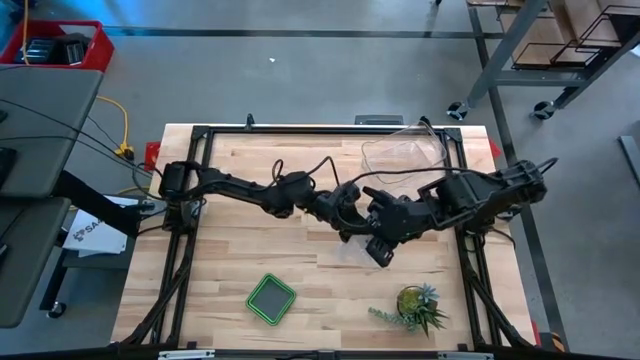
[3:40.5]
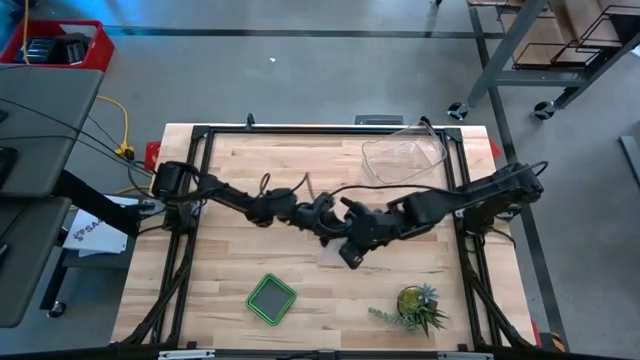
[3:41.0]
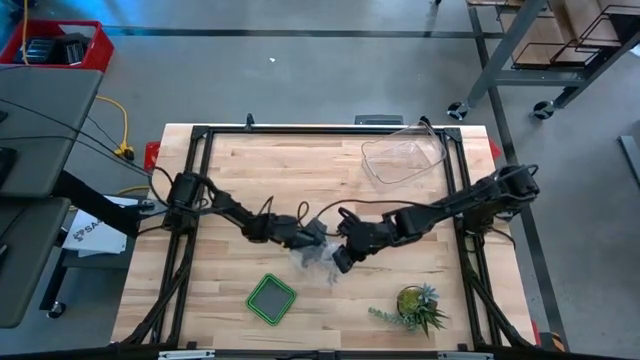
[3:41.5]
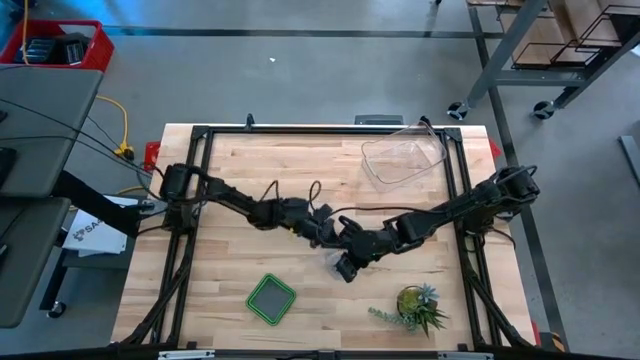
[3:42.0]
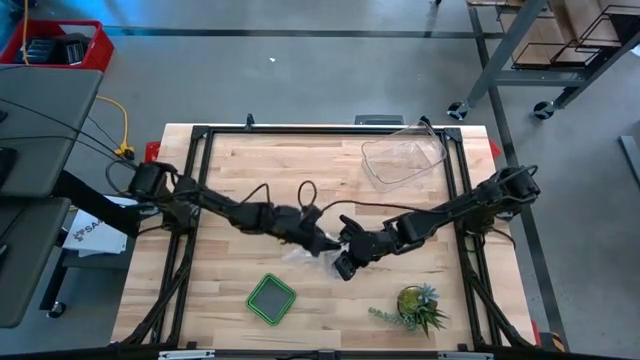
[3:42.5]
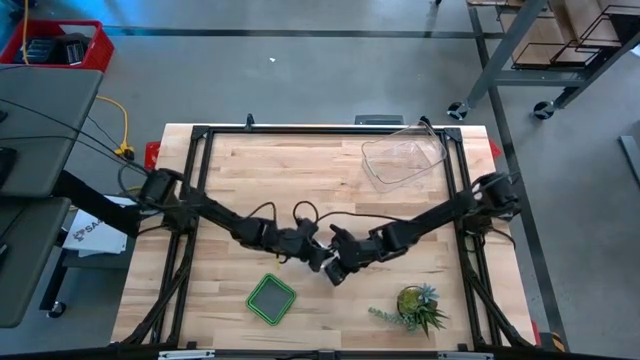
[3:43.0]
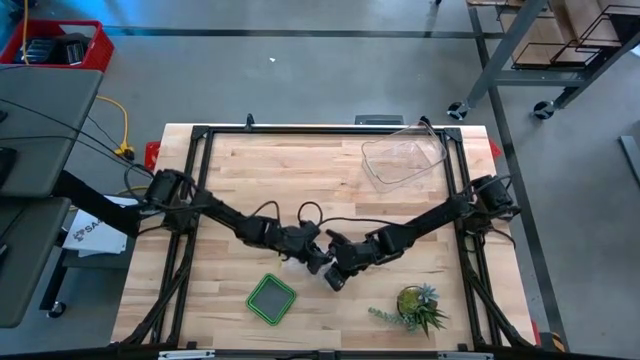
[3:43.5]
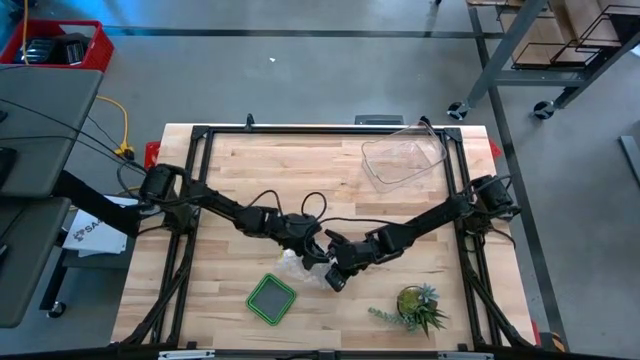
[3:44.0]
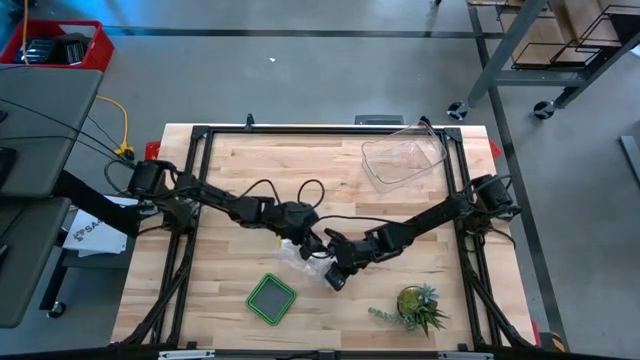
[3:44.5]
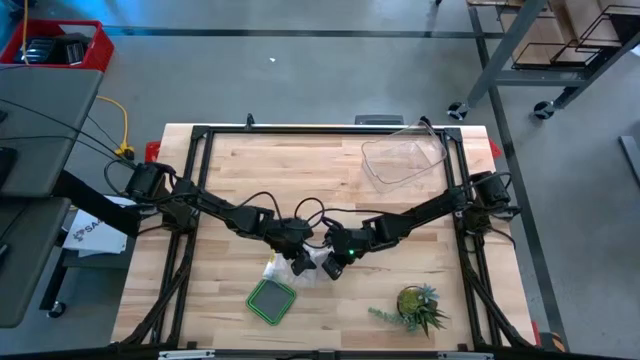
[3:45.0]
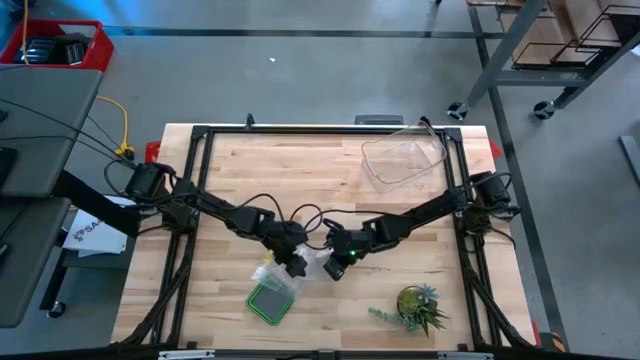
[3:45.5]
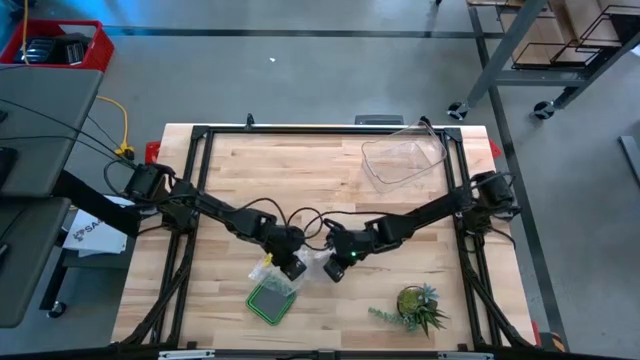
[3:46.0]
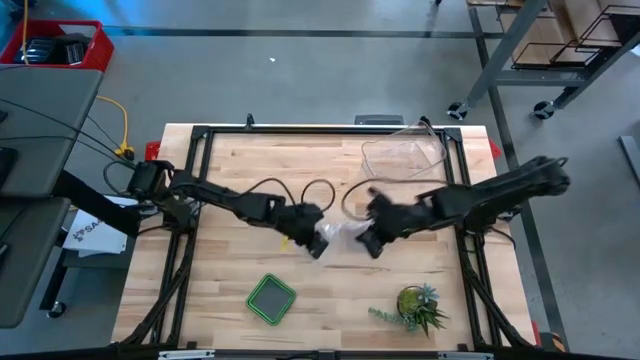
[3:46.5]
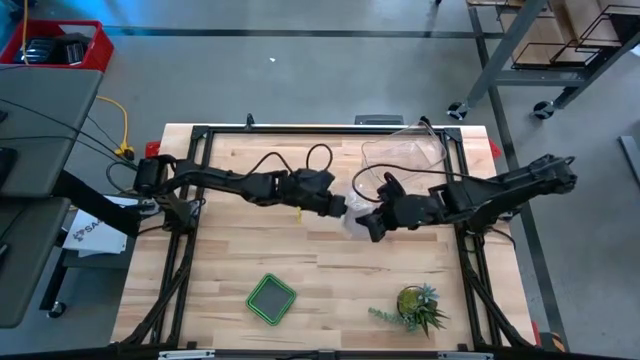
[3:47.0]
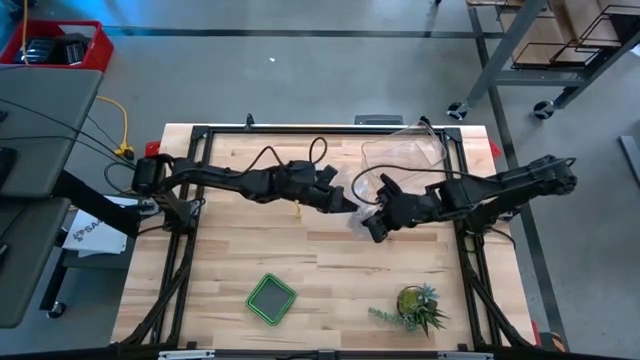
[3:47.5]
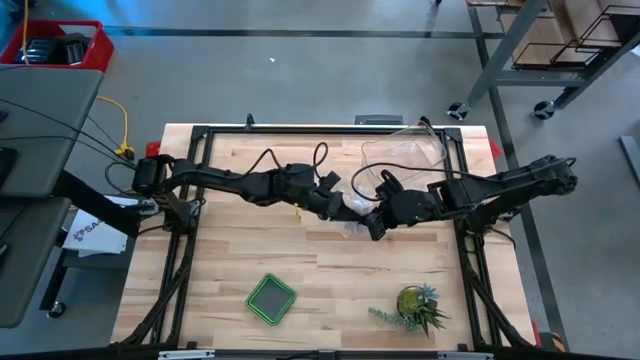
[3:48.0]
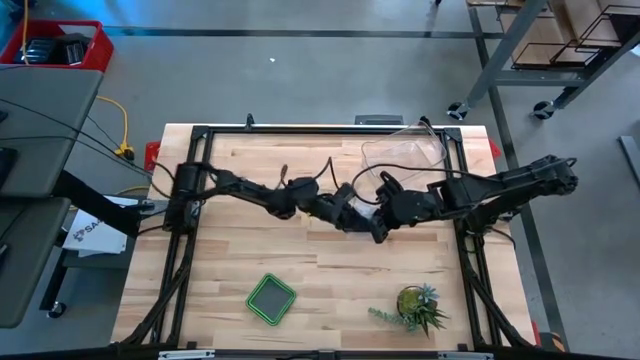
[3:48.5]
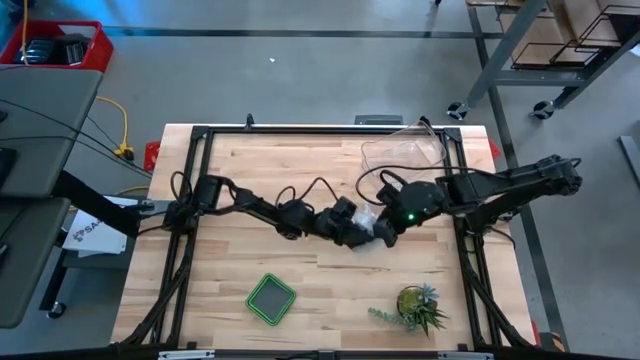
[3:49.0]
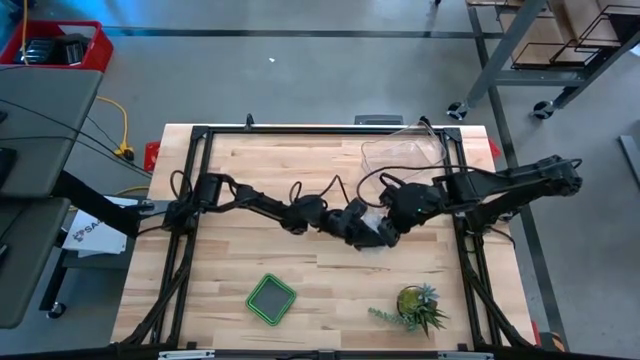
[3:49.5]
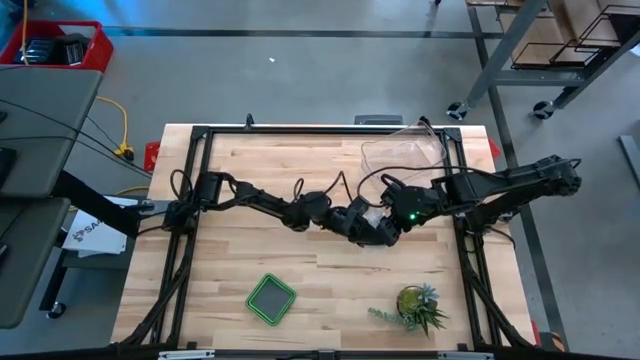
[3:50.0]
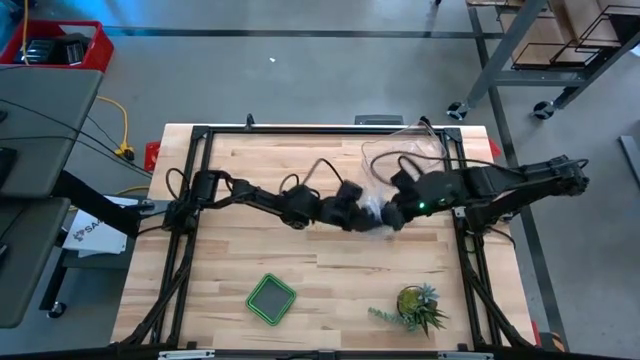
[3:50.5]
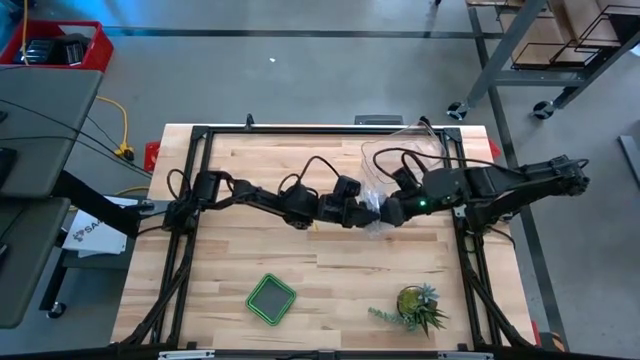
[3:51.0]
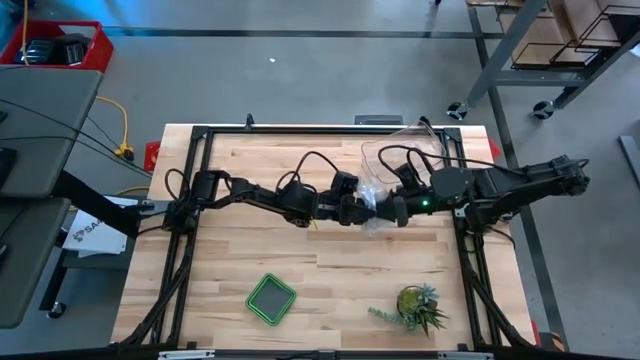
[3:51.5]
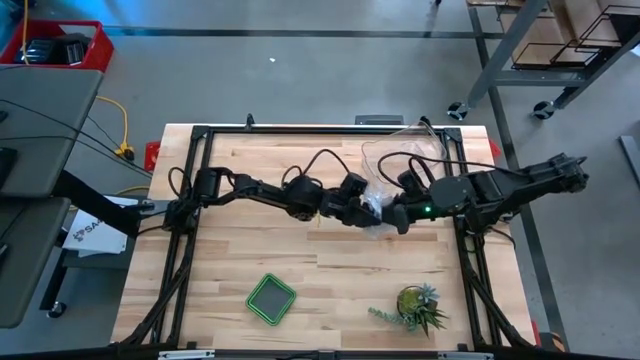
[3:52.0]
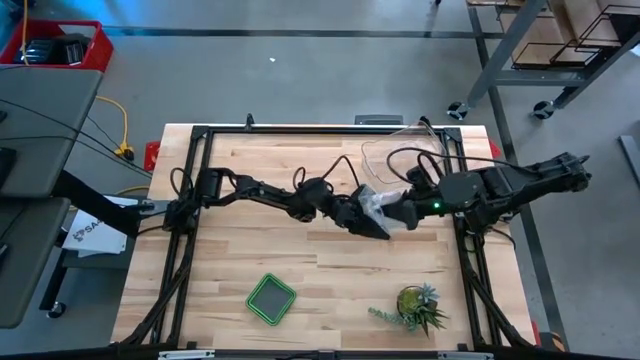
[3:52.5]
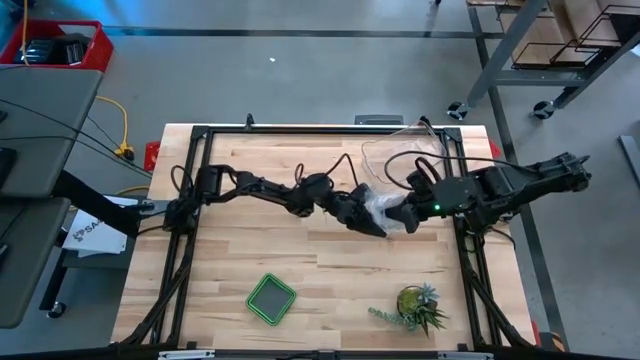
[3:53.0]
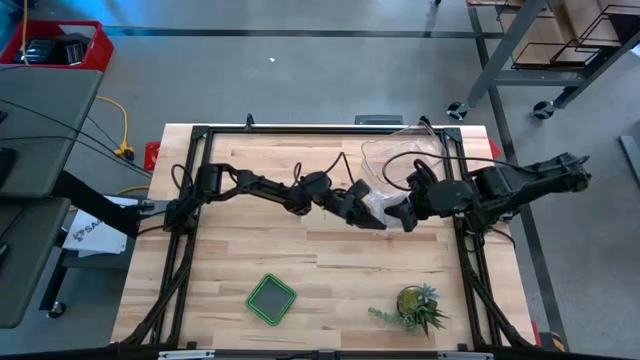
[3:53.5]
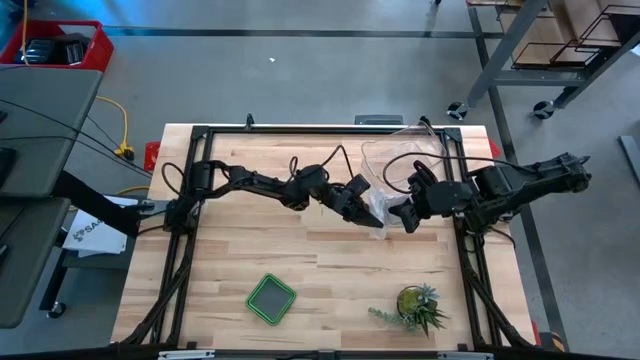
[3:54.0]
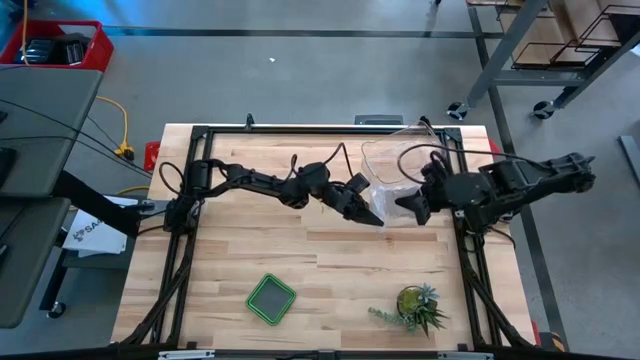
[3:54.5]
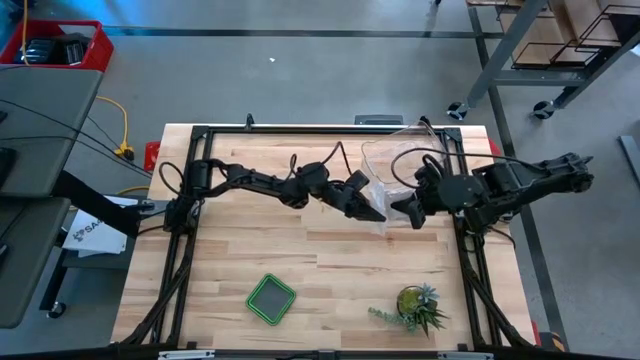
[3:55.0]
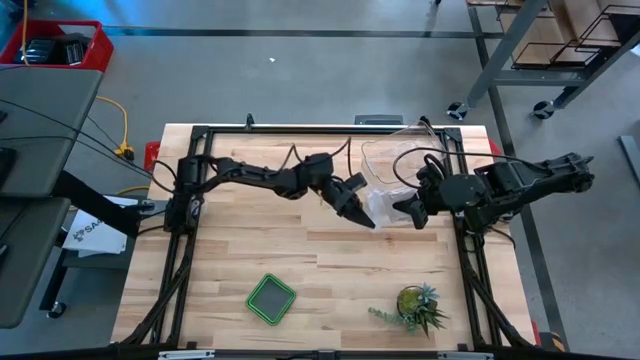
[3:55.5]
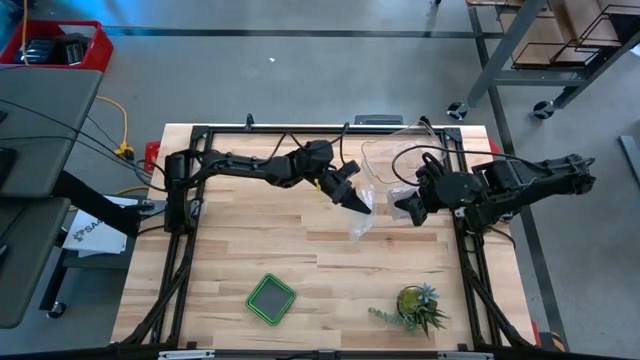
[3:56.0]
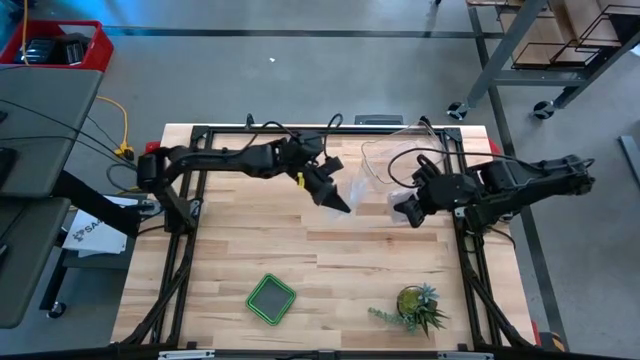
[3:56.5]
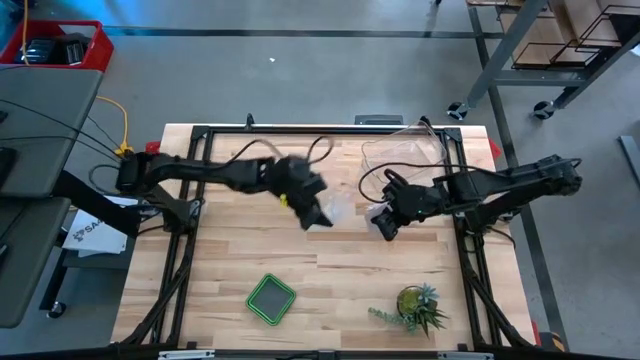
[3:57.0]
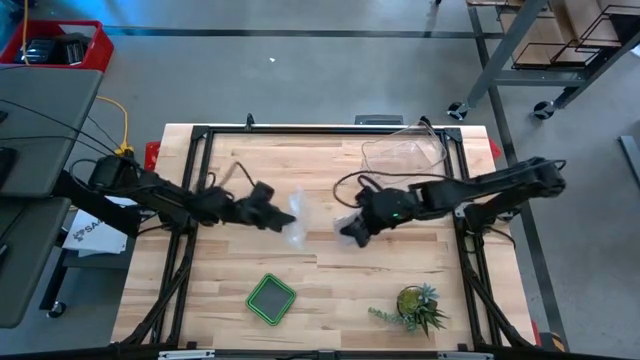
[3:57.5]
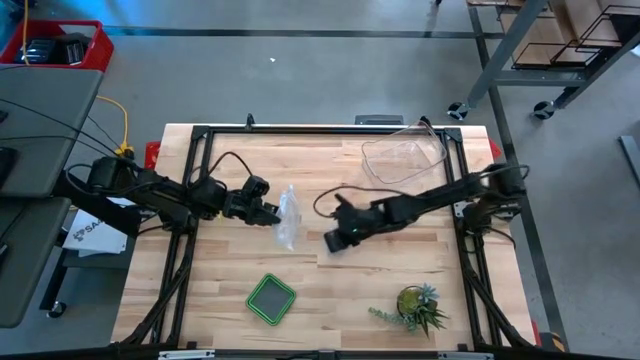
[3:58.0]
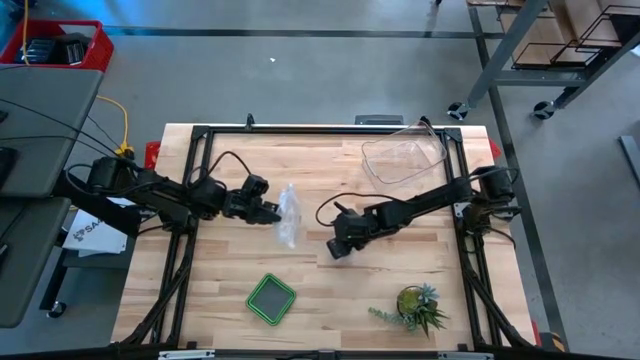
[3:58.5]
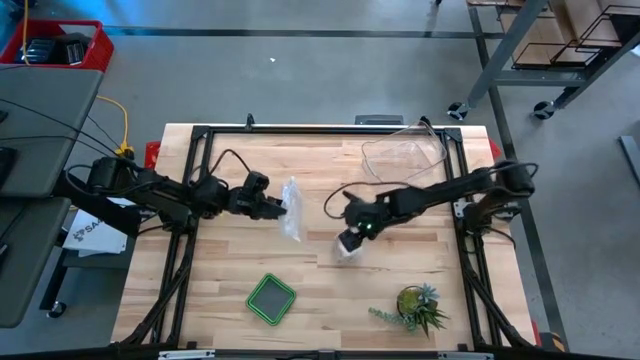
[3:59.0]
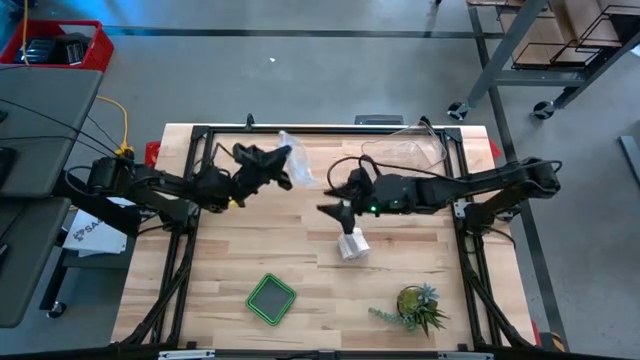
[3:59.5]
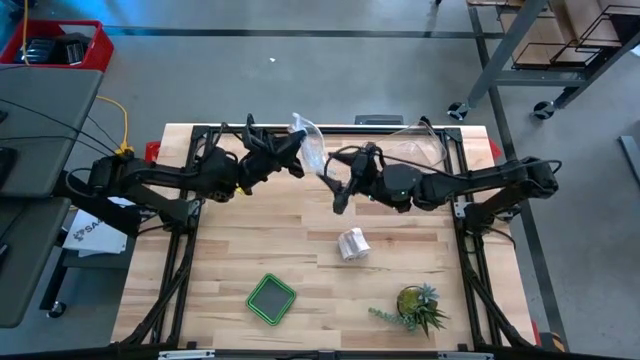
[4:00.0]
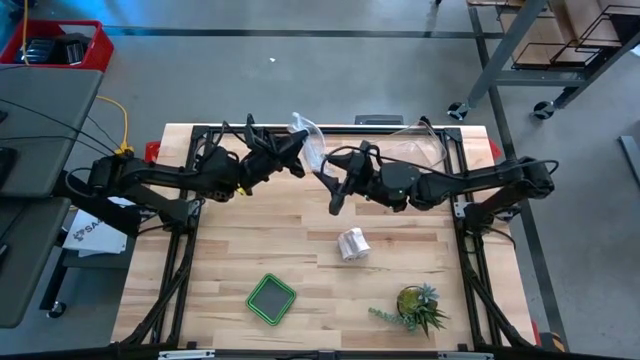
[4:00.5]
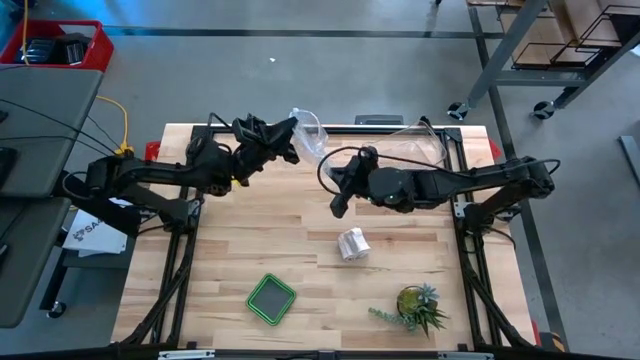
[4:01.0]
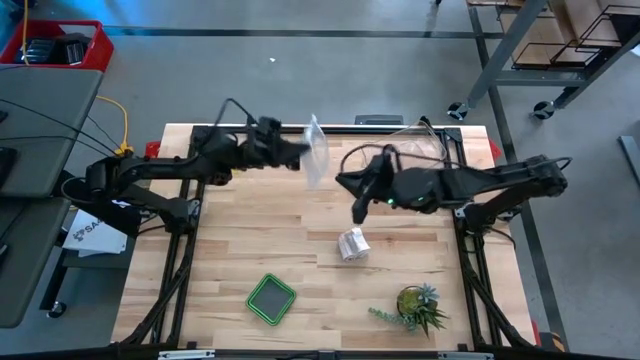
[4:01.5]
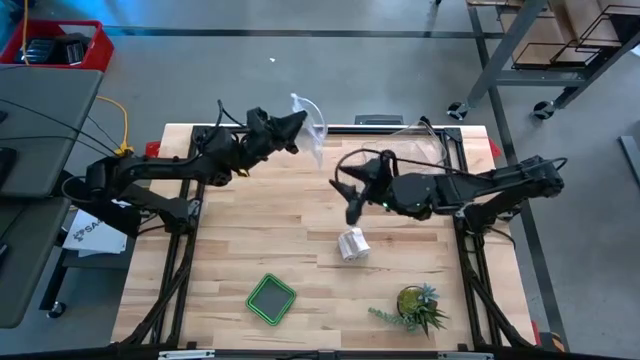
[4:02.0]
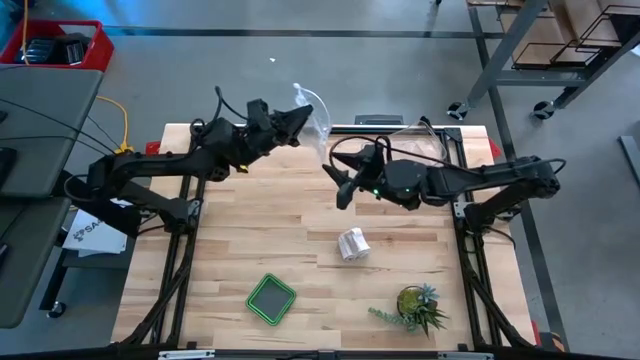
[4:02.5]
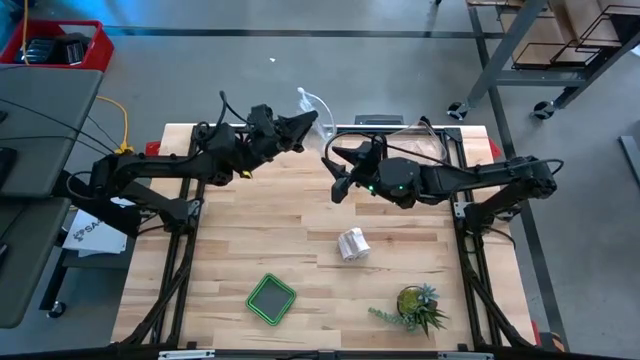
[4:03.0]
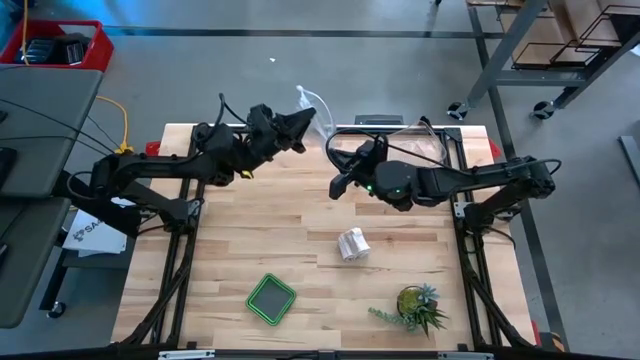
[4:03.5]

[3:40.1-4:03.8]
Task: Roll bandage
Put the rolled white bandage into the transparent zip bag
